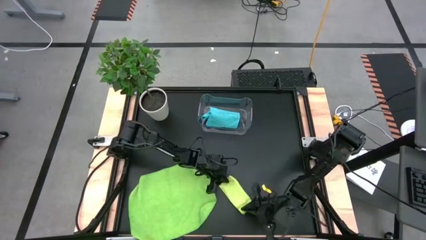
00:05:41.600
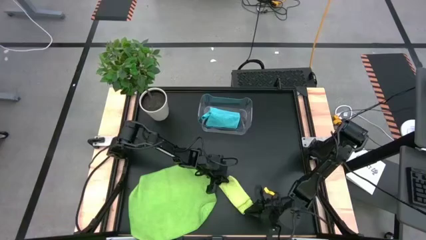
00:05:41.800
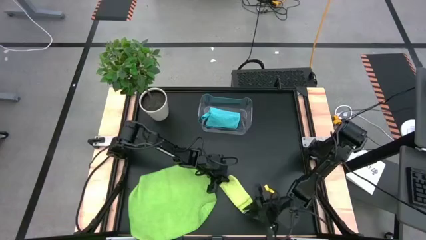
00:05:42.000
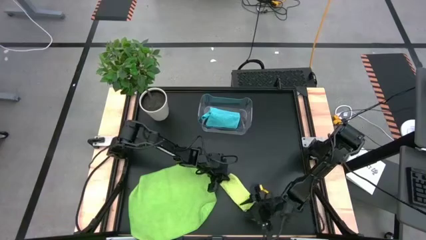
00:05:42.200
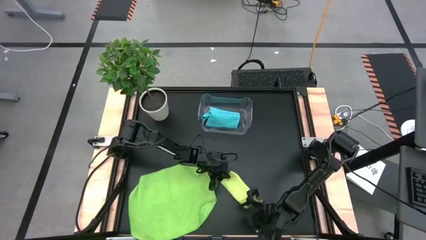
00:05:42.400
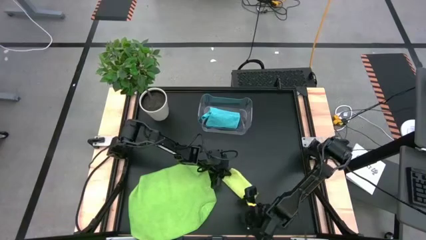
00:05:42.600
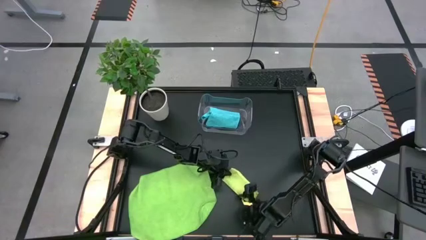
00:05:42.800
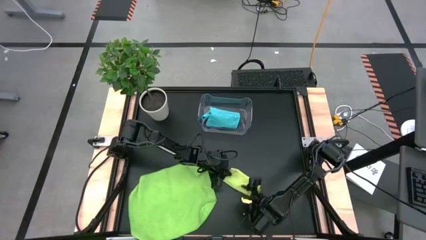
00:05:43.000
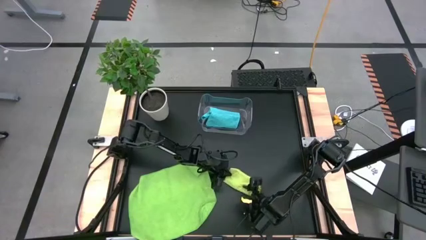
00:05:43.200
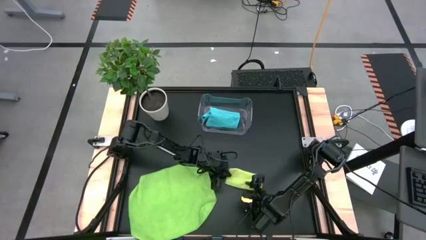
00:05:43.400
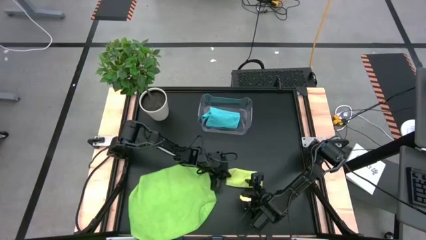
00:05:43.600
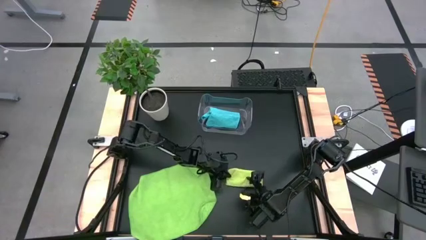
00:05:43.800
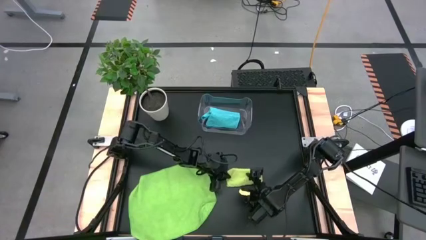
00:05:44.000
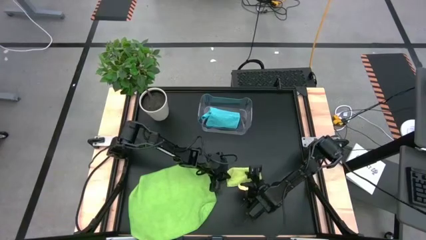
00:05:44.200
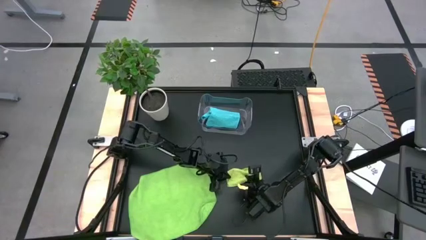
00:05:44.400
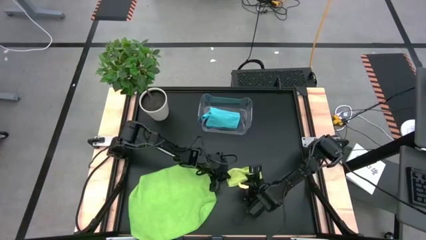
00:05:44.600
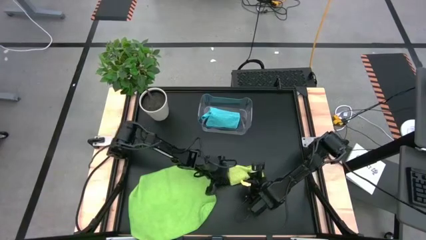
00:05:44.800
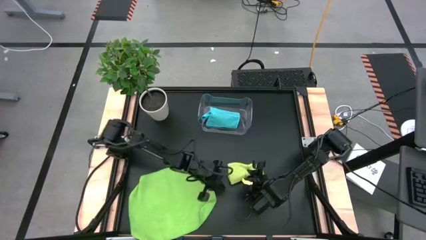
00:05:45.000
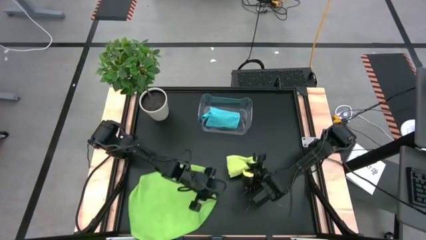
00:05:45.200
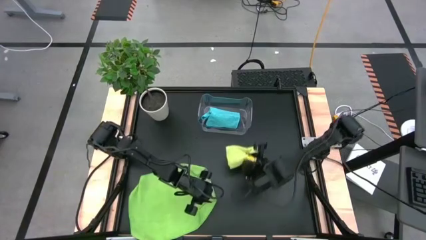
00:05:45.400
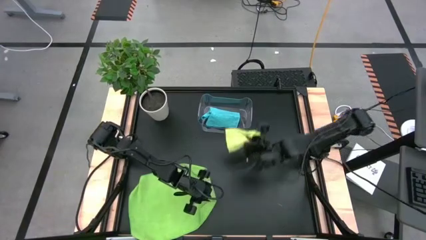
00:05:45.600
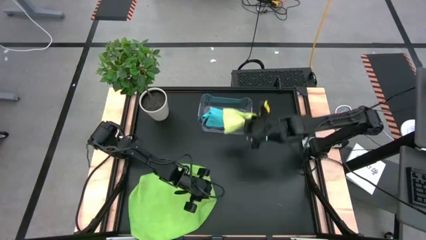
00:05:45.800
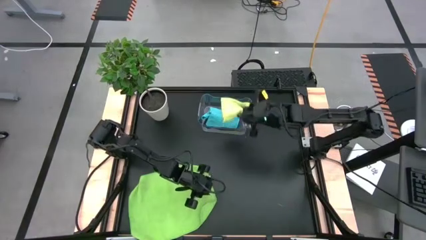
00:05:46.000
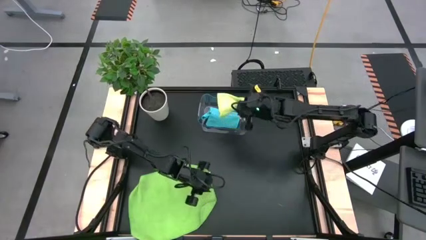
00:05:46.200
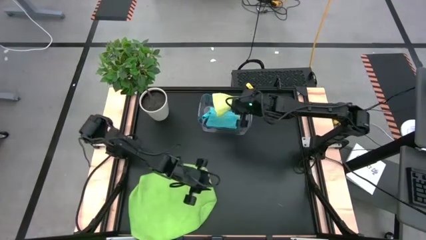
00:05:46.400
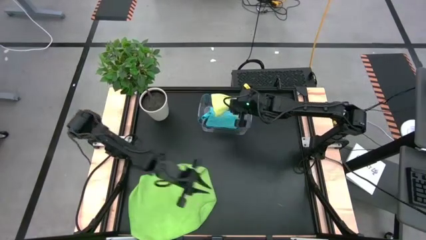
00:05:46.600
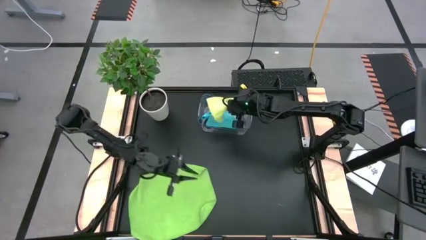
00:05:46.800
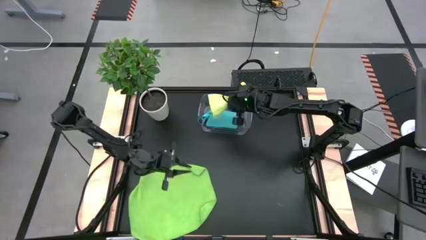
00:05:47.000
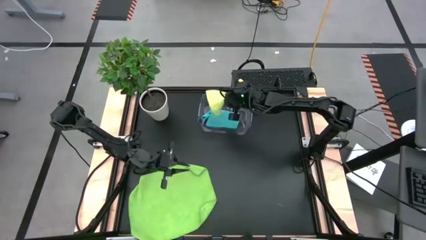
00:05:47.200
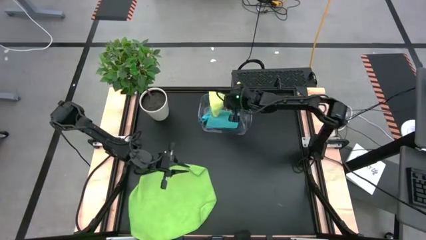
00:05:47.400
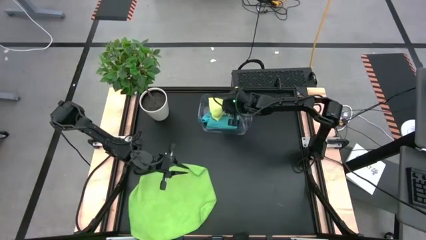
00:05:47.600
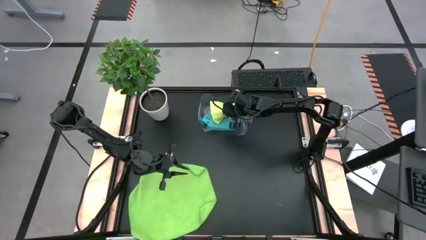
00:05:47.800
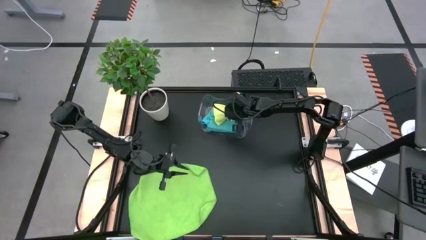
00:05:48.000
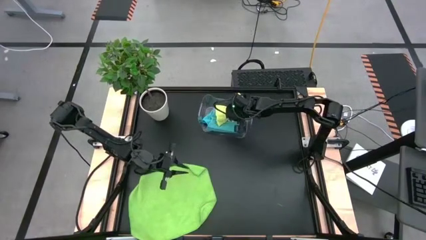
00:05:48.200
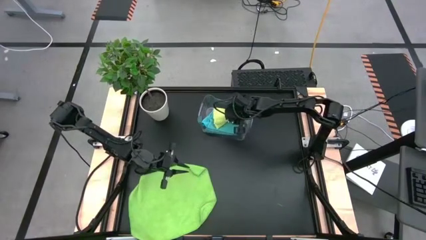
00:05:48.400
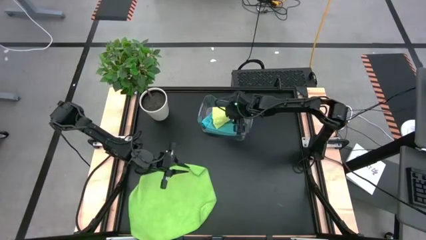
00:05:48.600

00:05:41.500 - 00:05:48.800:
Task: Fold microfiber towels
Put the light green towel into the transparent bin

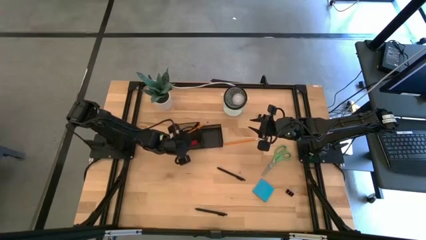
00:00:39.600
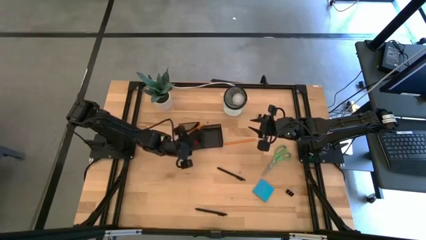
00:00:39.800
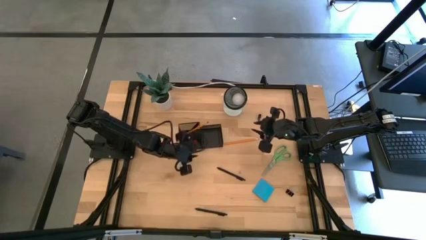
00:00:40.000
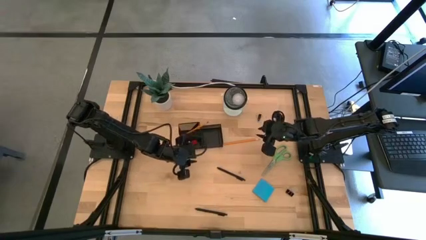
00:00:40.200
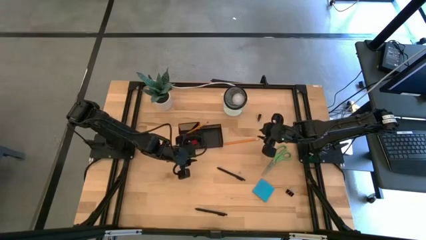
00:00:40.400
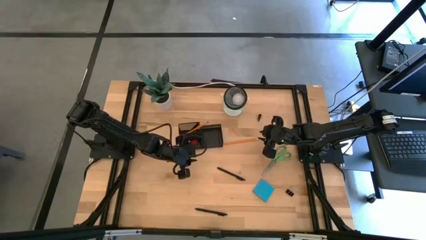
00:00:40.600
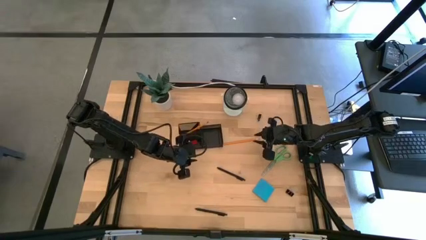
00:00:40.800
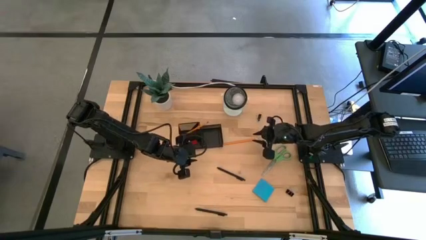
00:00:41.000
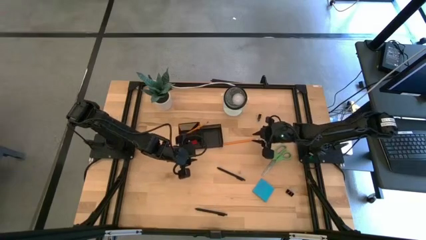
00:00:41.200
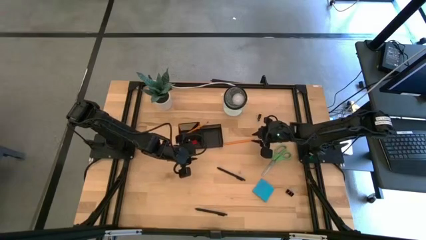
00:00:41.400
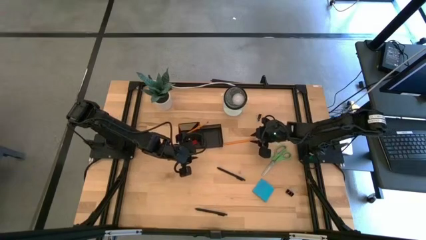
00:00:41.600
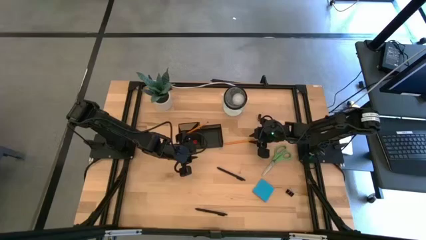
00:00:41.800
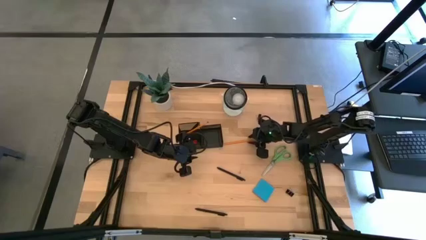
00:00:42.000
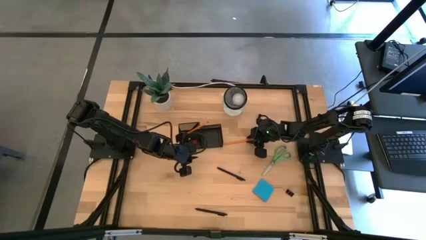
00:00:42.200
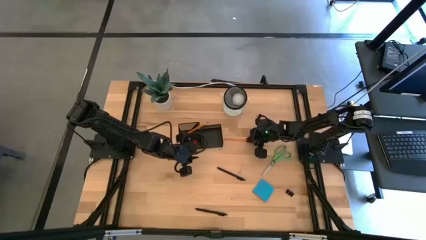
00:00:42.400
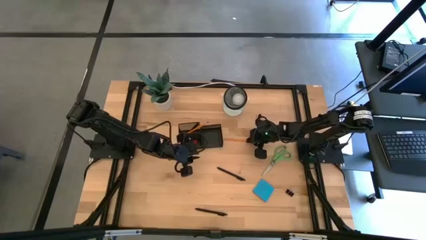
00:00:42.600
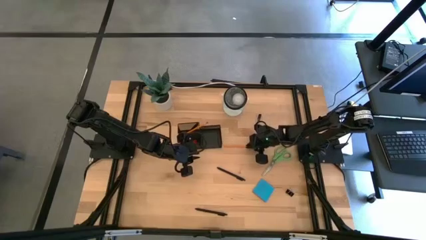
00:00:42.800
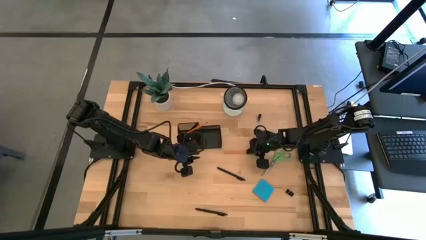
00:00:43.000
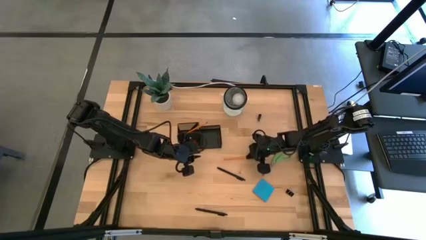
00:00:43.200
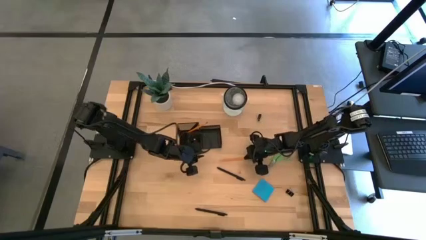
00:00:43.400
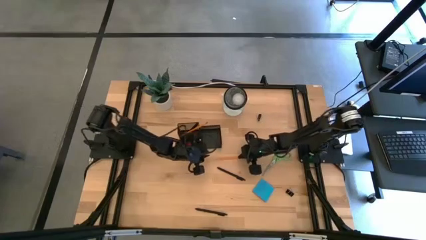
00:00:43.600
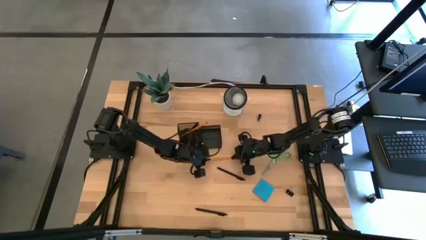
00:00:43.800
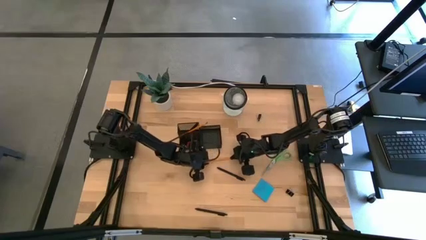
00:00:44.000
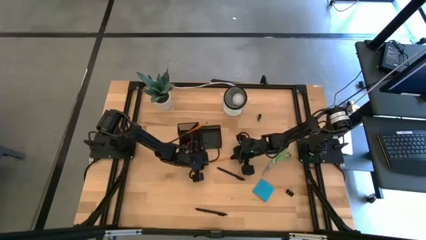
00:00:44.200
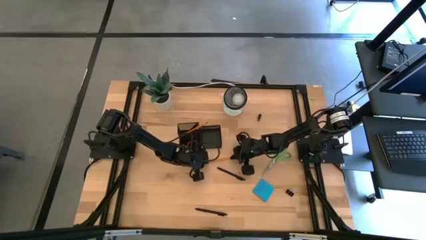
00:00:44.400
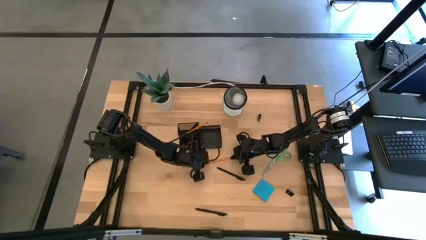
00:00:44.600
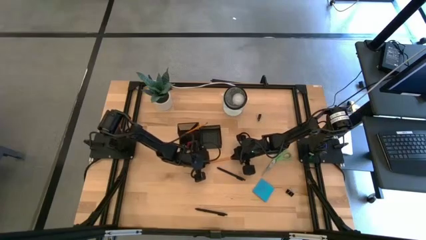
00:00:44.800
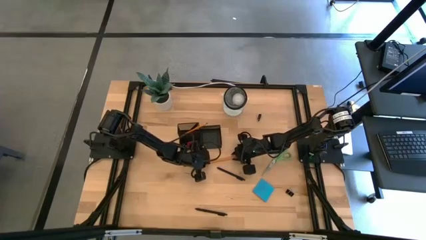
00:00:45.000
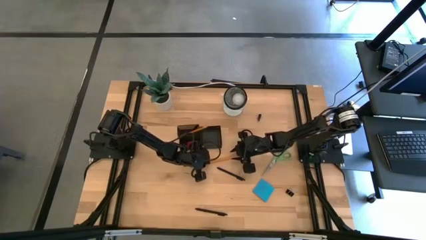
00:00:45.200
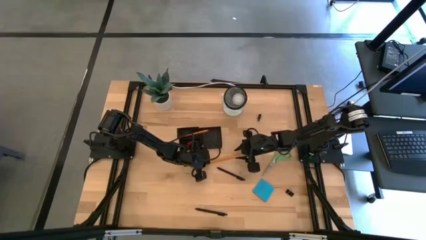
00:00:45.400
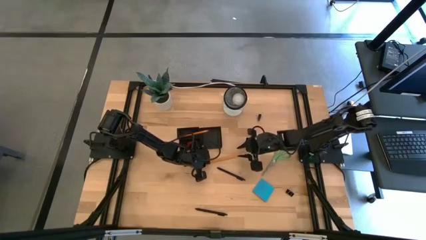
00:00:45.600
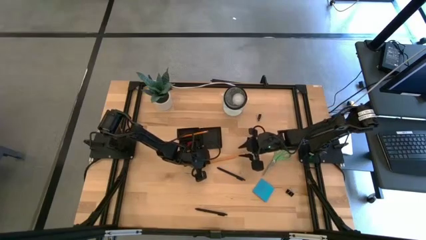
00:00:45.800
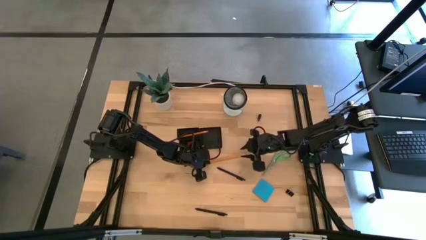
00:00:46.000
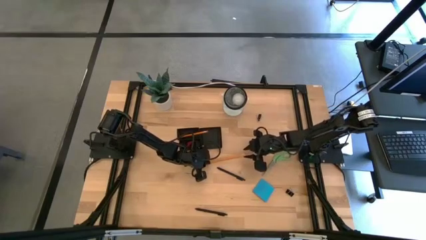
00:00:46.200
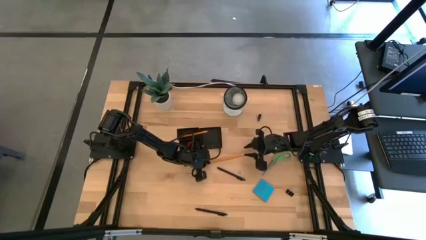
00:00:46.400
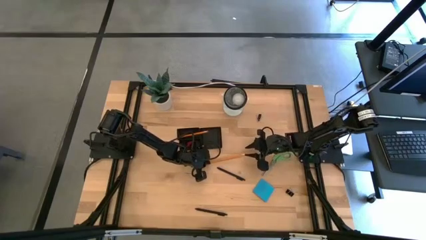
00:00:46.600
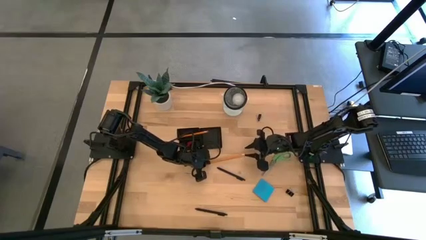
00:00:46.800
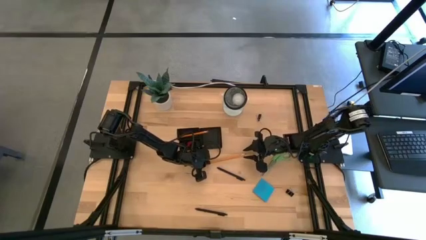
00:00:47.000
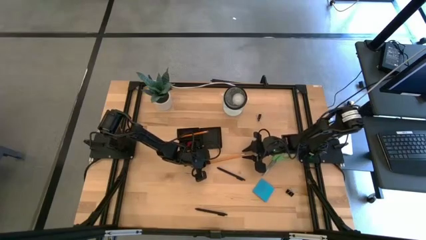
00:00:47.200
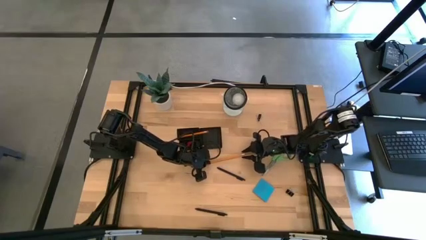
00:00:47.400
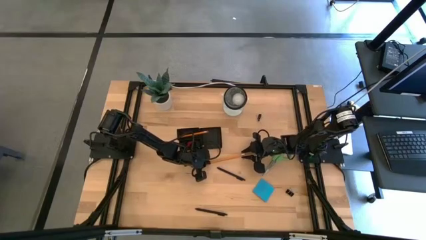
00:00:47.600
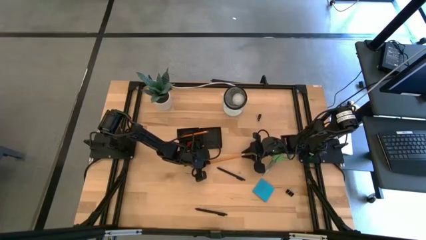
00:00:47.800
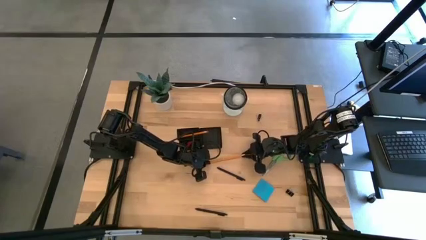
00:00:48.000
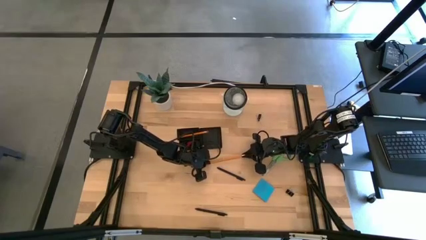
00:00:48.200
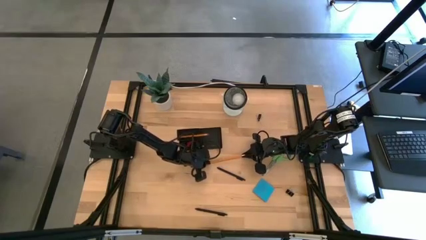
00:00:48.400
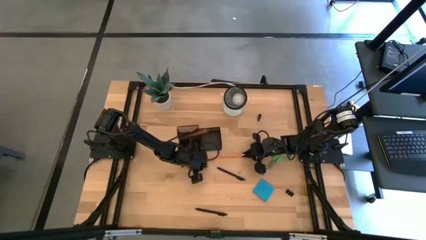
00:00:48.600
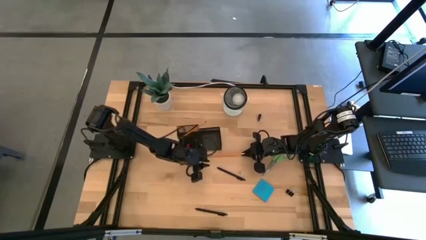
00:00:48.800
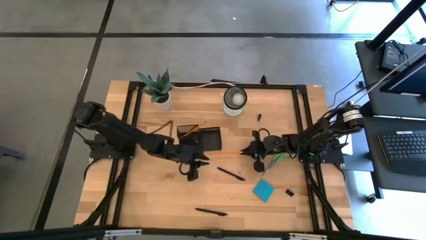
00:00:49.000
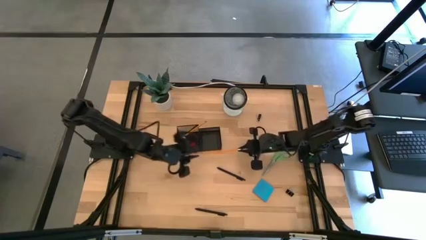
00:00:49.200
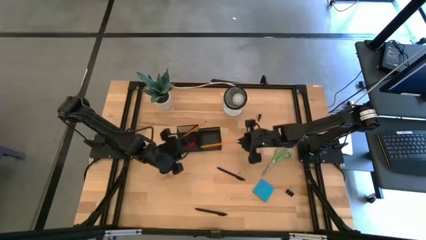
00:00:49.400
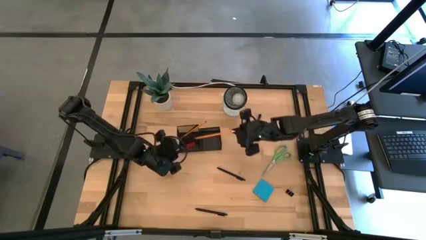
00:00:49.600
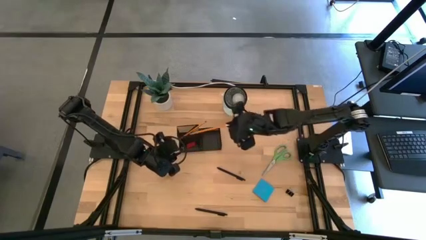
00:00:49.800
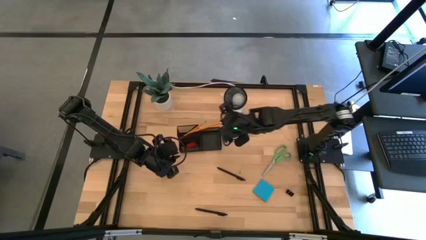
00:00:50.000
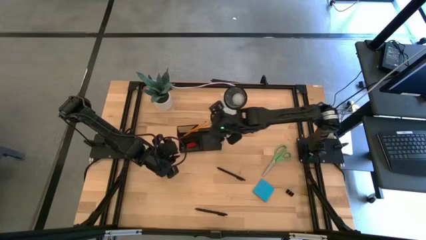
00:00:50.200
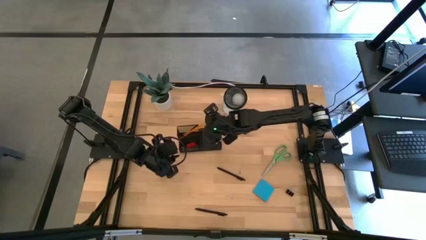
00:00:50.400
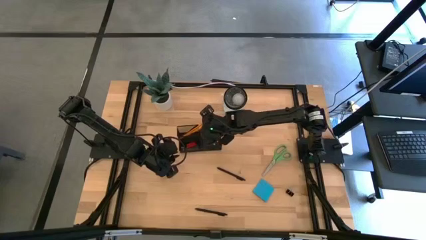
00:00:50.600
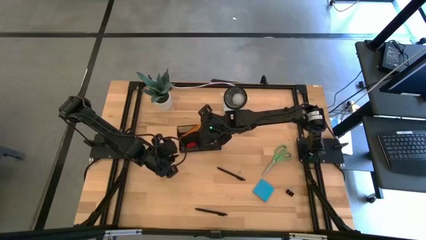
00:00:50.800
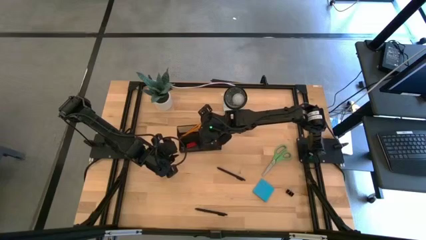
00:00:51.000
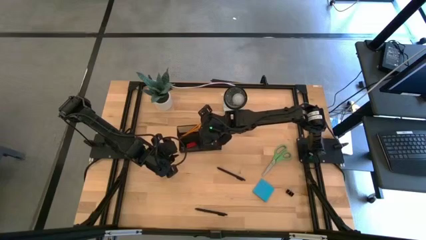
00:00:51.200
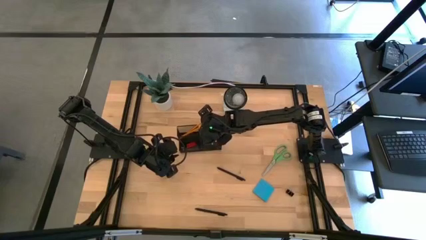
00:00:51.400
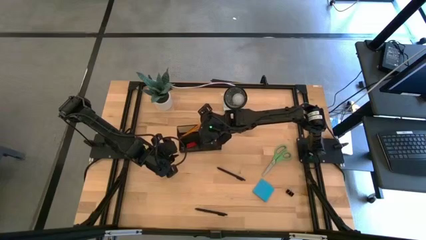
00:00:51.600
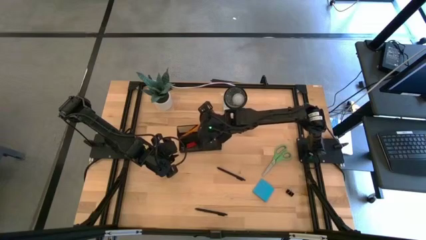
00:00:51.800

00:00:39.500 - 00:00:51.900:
Task: Pick and place office supplies into organizer
Put the yellow pencil in the desk organizer
